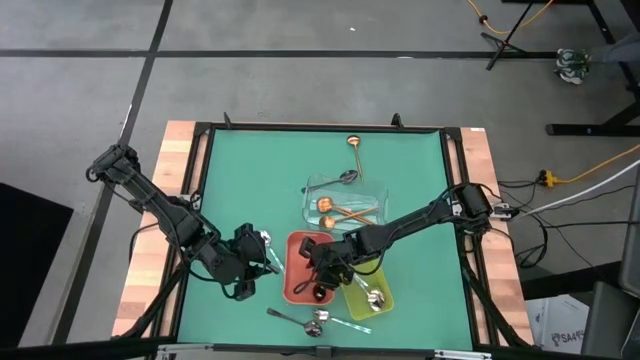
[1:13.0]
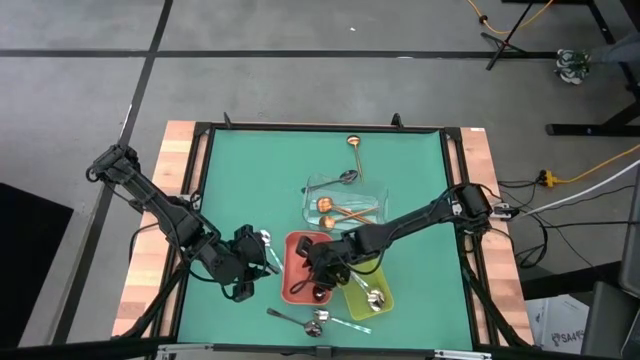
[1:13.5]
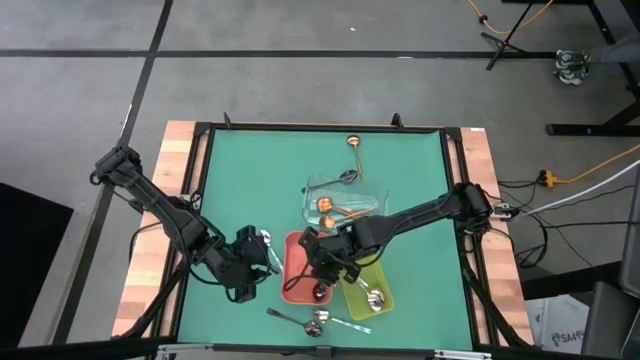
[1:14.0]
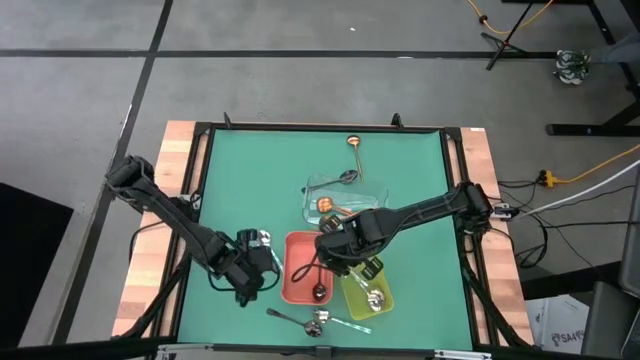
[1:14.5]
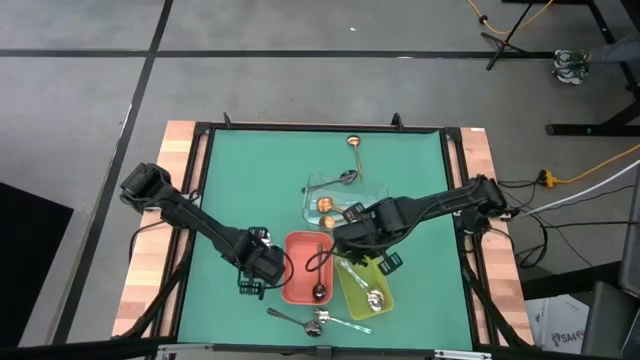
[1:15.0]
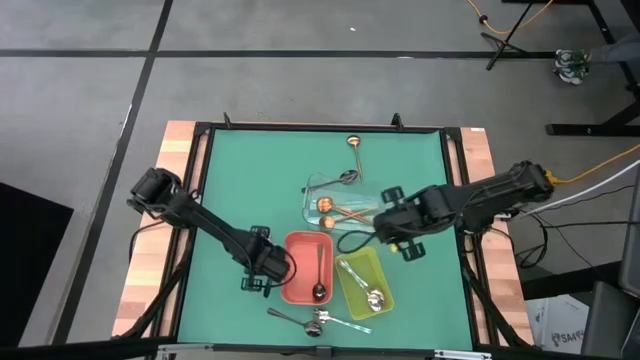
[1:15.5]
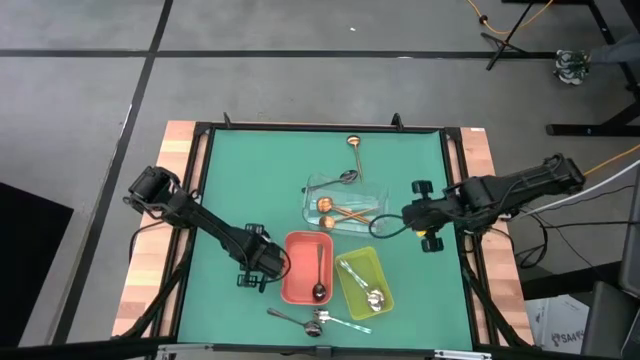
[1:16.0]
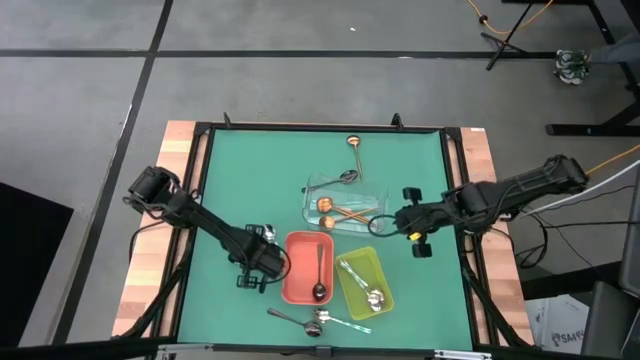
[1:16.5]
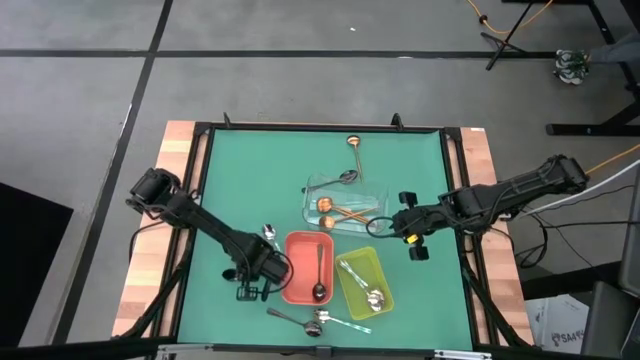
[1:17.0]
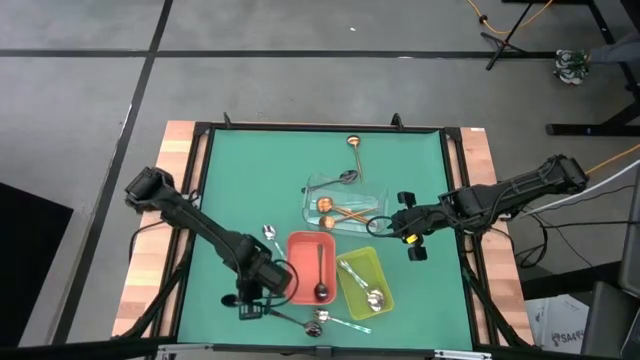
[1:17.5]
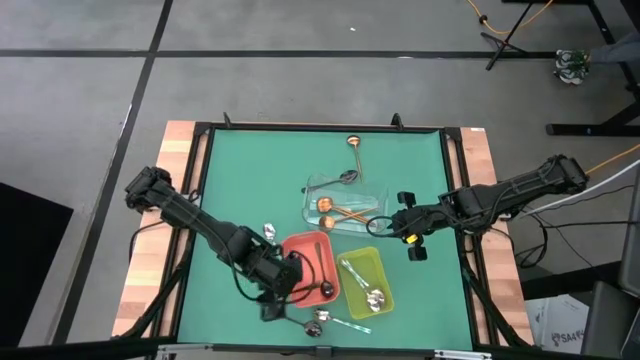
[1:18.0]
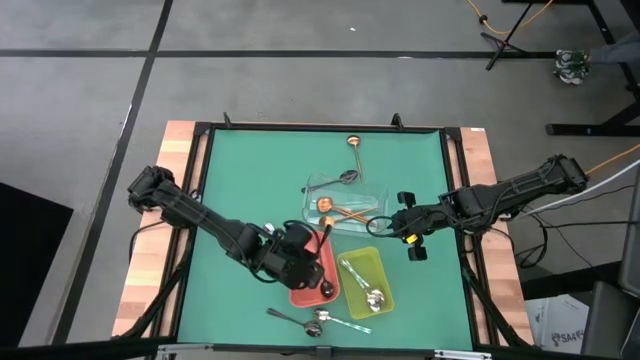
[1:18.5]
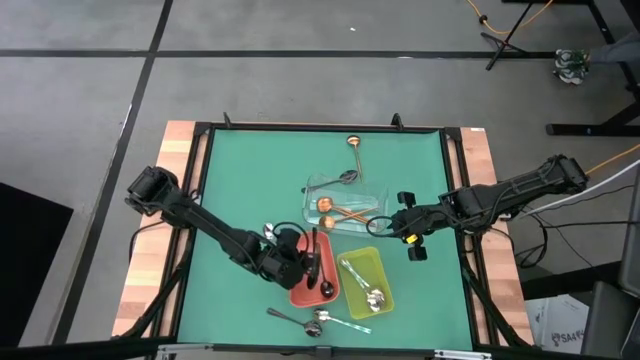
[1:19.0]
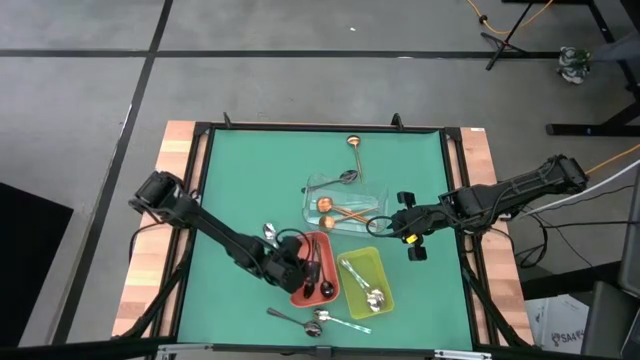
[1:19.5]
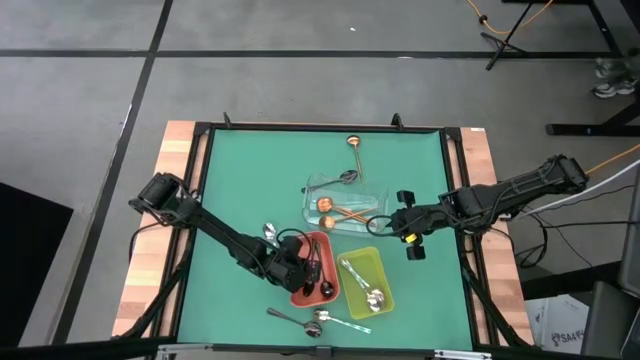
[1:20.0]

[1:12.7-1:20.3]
Task: Sort silverware by color (type)
Put the black spoon into the orange bin

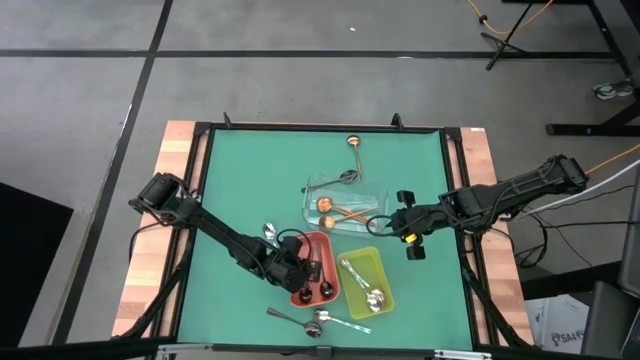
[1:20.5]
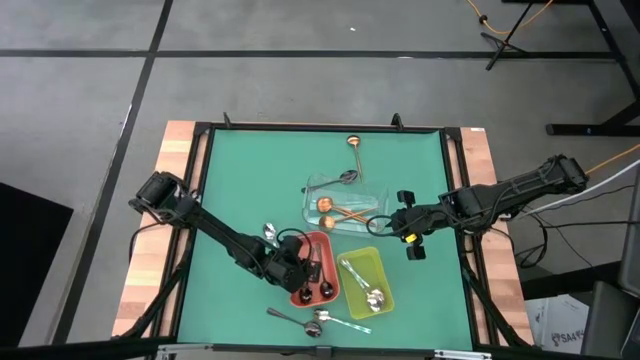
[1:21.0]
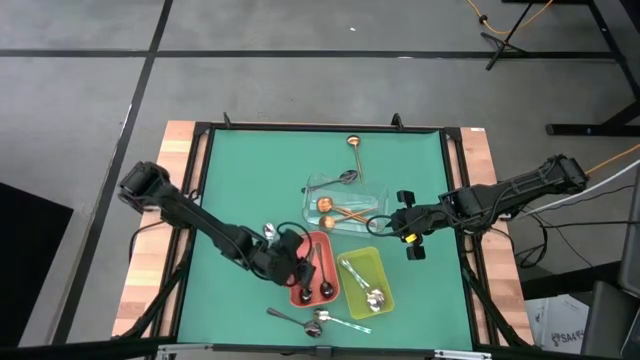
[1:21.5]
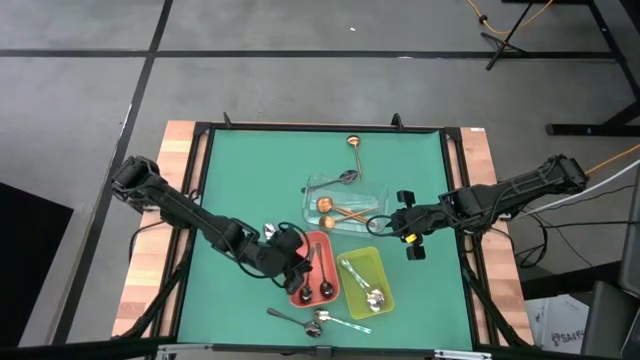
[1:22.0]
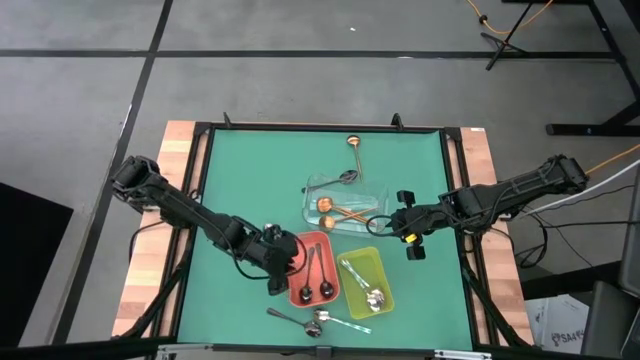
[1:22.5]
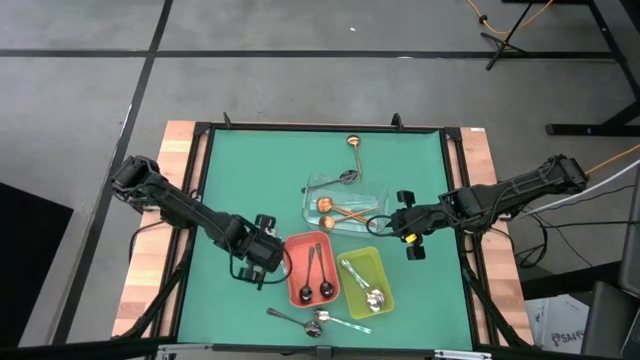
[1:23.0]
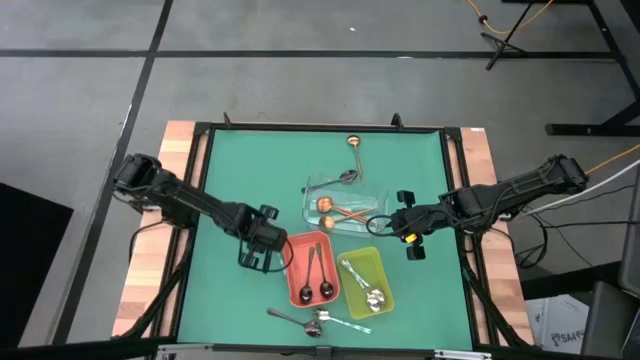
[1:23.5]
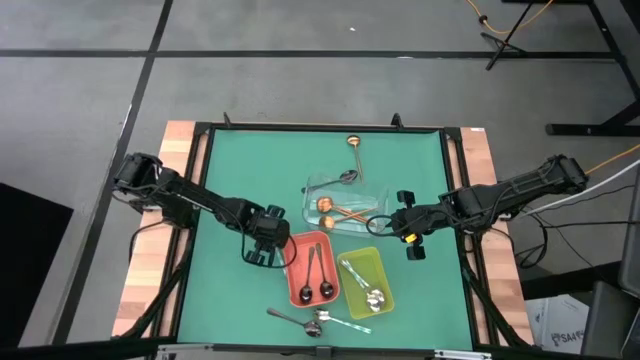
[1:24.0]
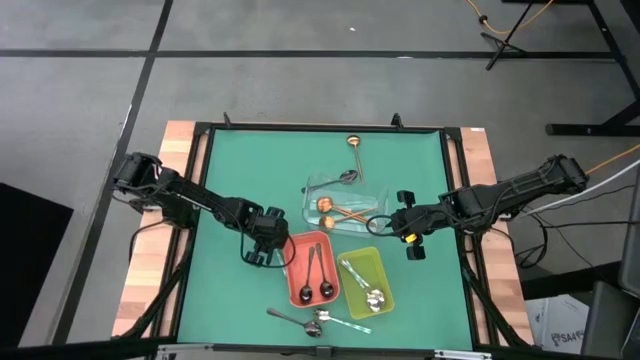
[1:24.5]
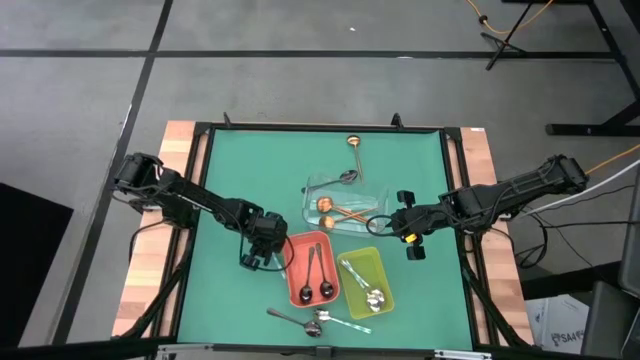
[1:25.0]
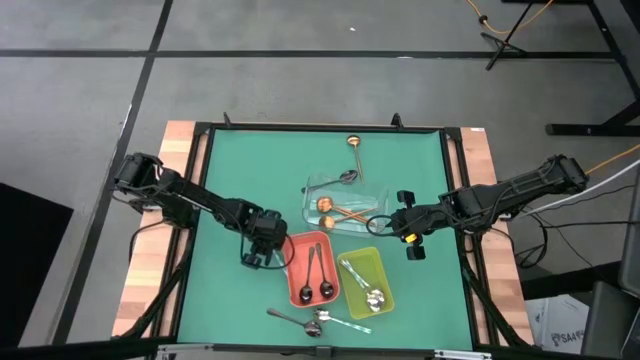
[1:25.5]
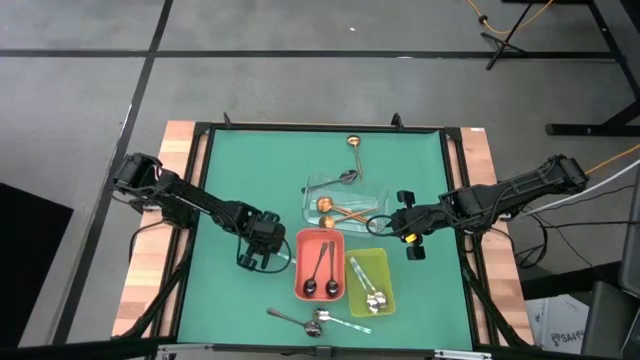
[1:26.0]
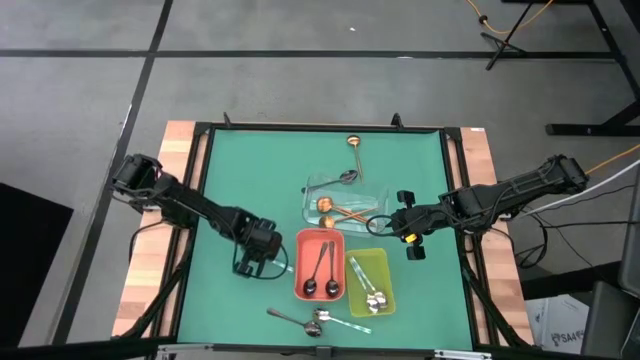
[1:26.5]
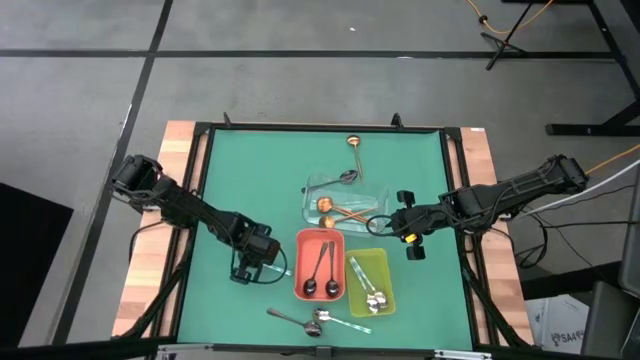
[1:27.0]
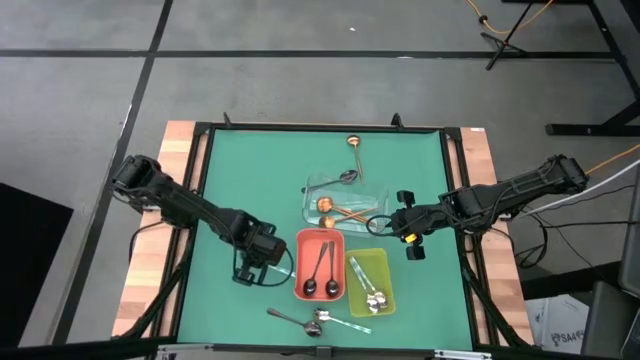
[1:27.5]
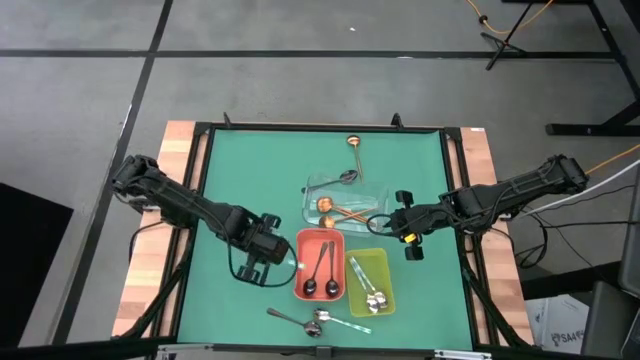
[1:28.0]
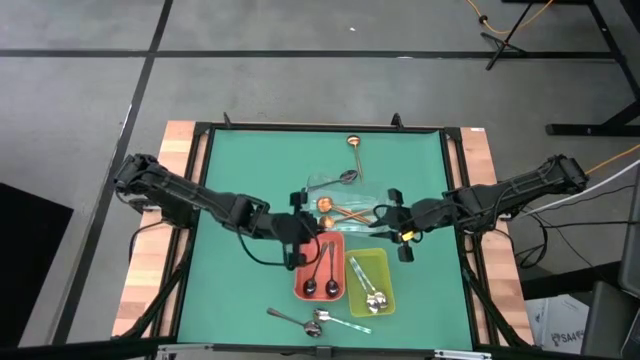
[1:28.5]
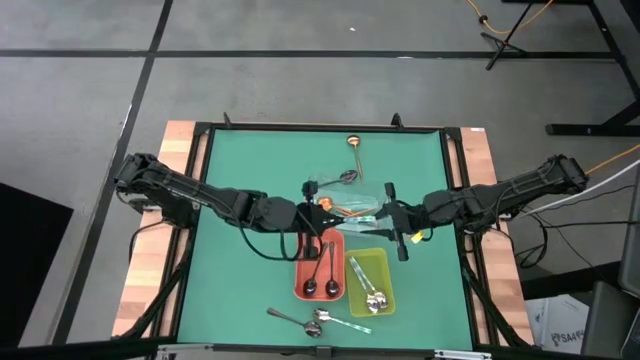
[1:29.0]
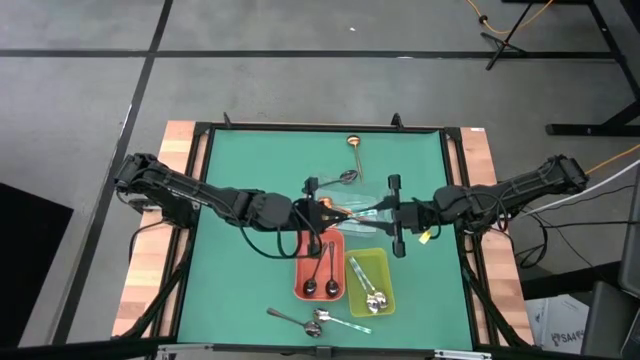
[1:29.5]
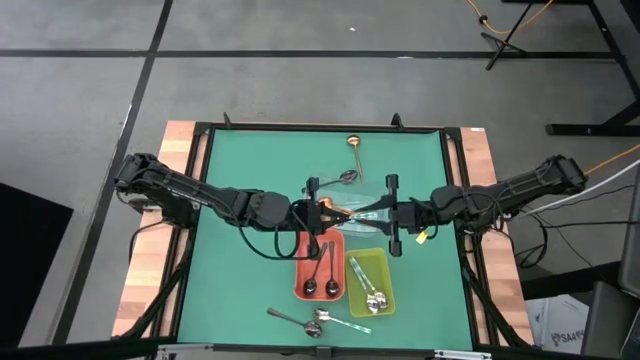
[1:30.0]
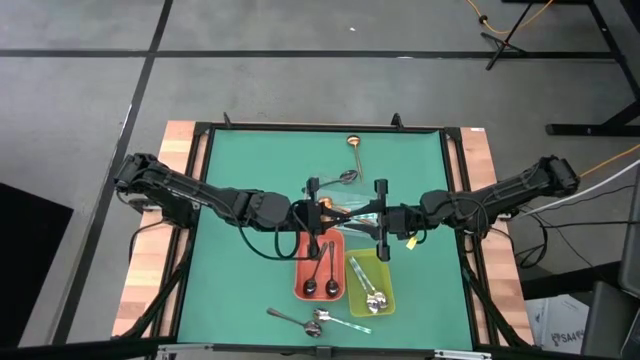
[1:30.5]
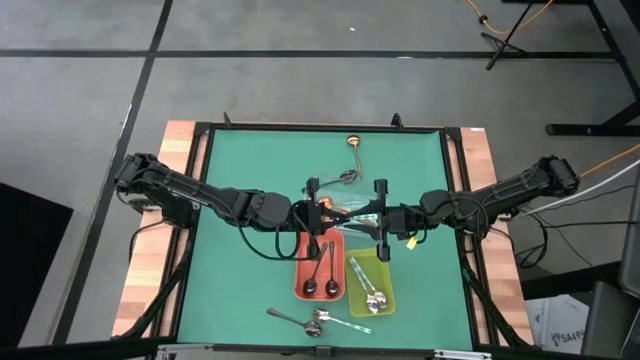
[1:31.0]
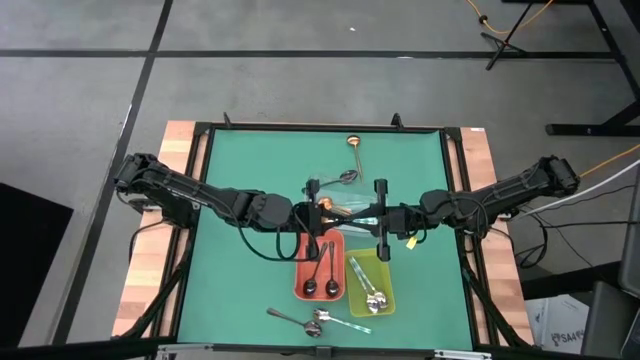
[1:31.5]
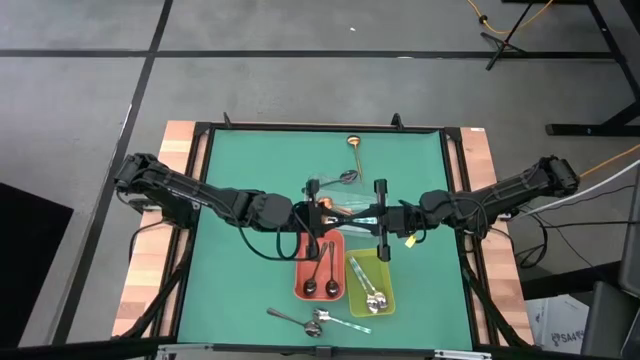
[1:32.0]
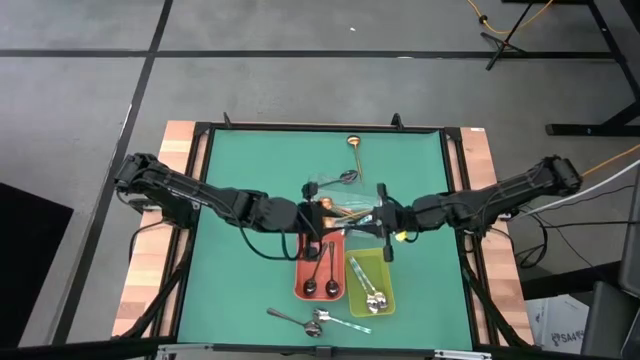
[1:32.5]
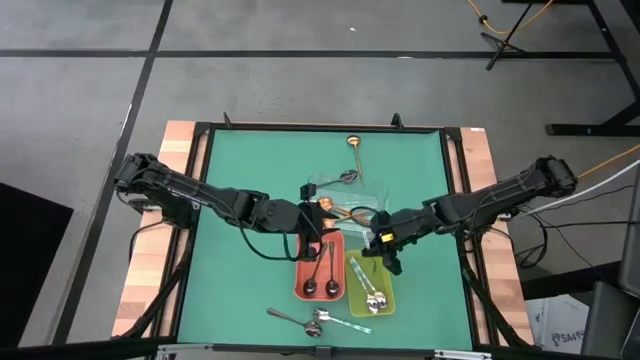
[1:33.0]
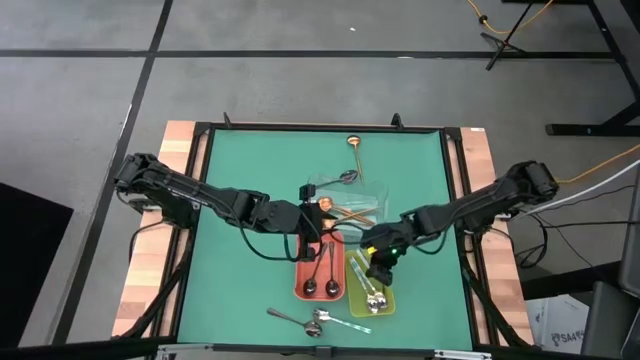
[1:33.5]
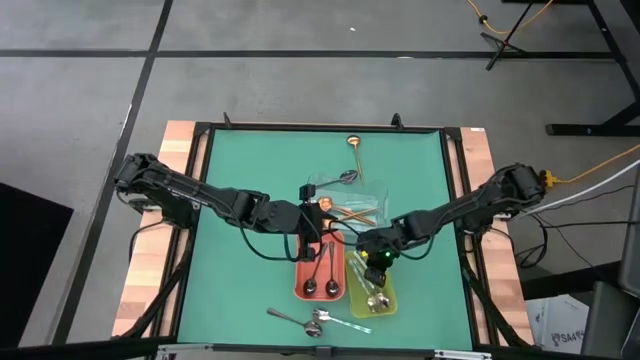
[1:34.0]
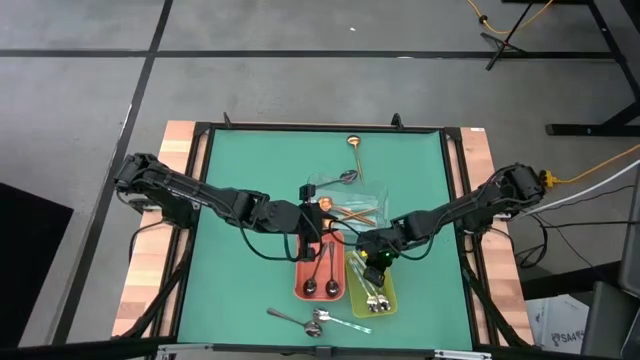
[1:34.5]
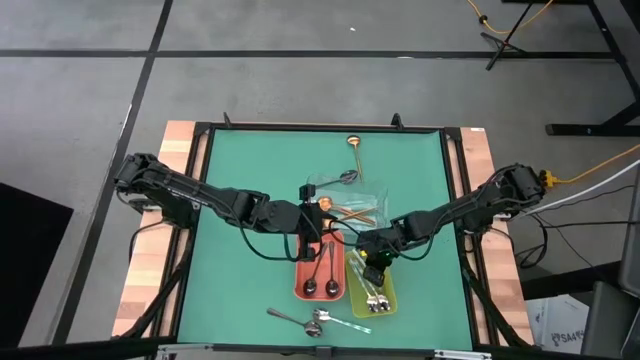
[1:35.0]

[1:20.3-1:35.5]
Put the blue patterned spoon into the yellow bin
